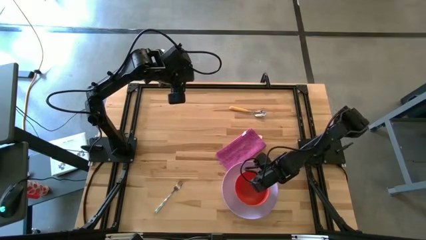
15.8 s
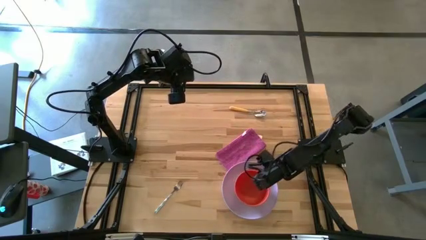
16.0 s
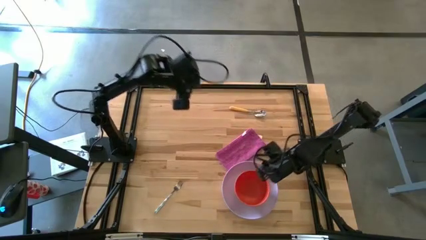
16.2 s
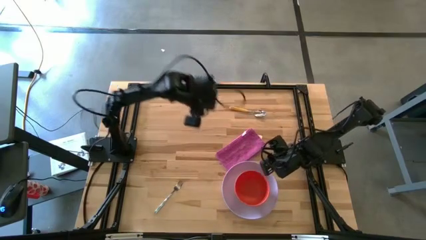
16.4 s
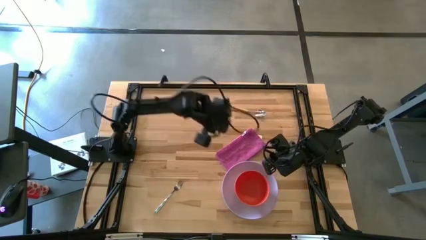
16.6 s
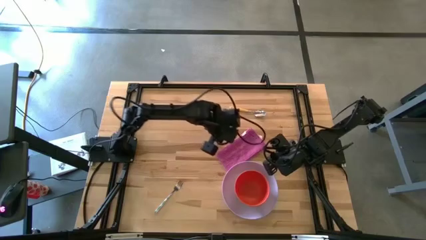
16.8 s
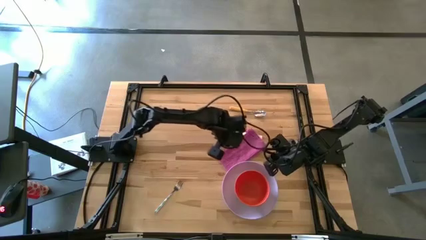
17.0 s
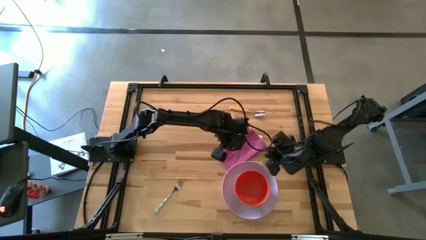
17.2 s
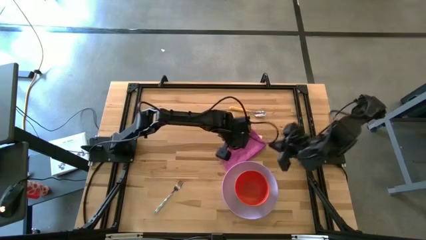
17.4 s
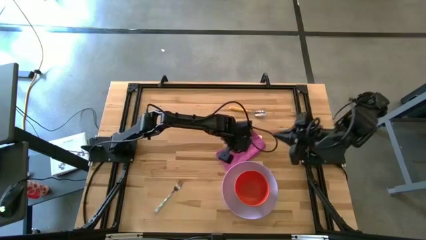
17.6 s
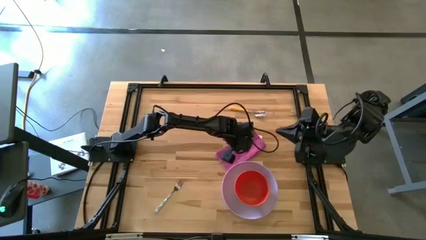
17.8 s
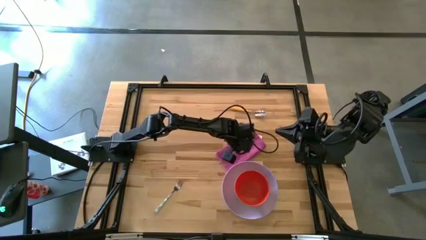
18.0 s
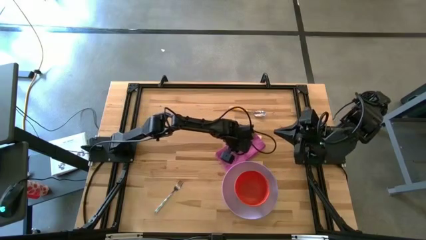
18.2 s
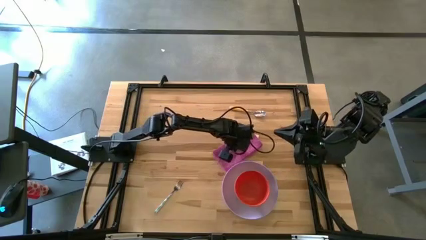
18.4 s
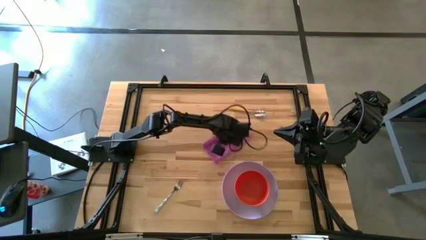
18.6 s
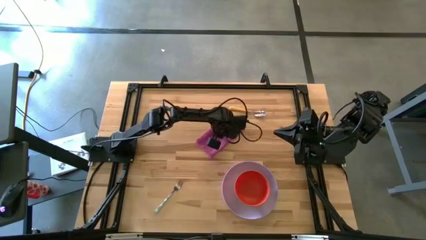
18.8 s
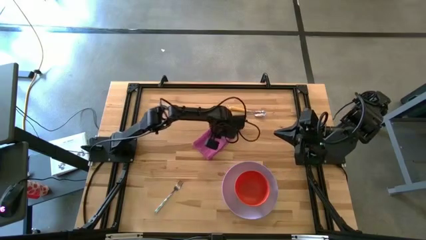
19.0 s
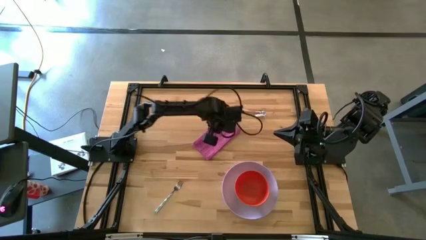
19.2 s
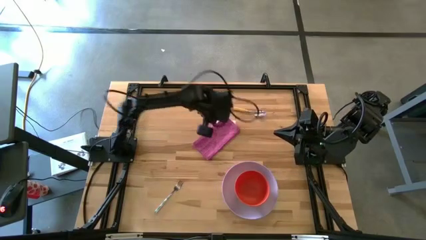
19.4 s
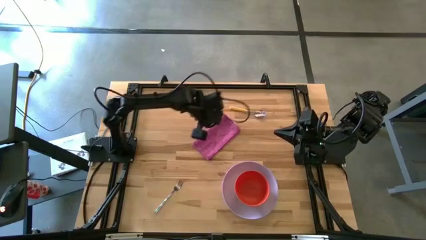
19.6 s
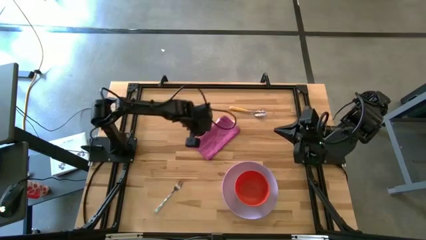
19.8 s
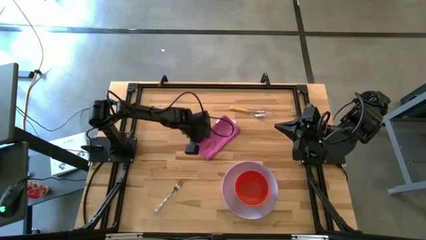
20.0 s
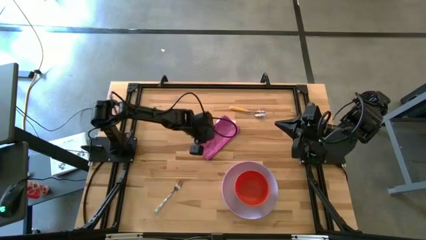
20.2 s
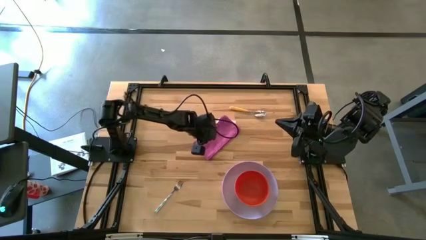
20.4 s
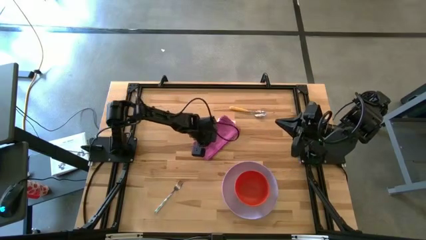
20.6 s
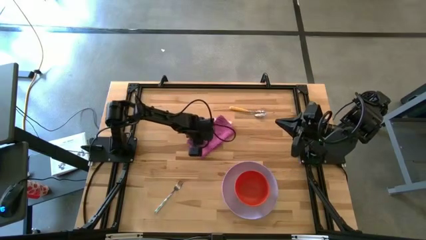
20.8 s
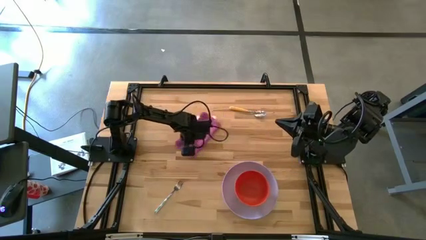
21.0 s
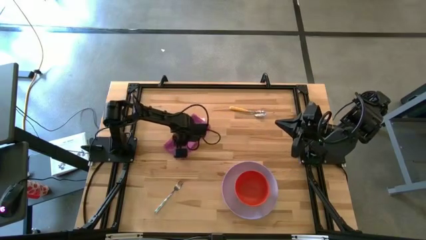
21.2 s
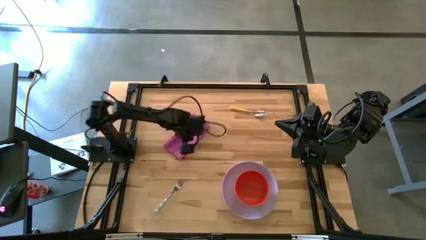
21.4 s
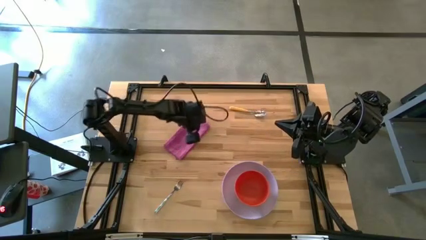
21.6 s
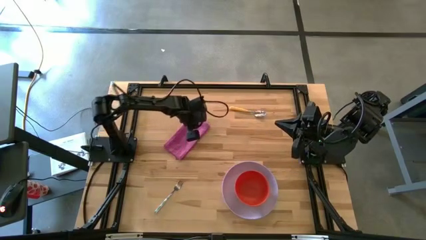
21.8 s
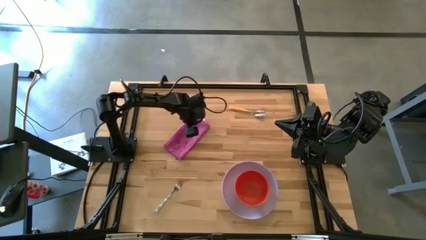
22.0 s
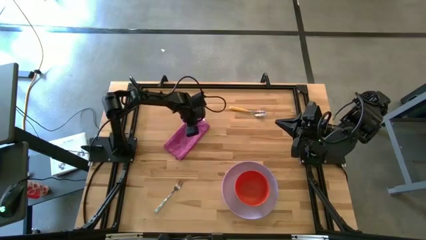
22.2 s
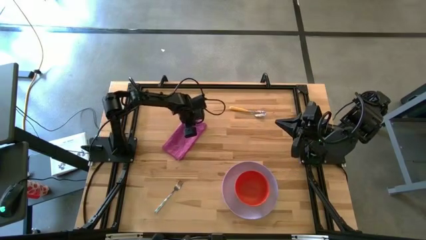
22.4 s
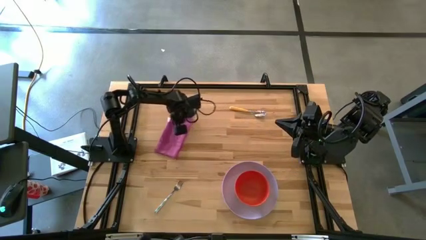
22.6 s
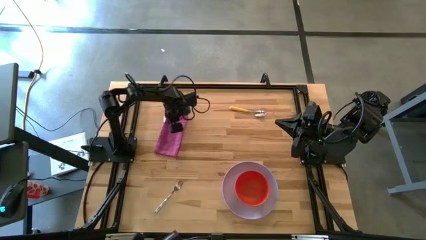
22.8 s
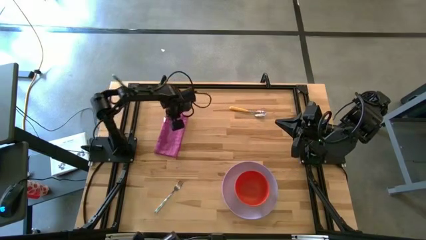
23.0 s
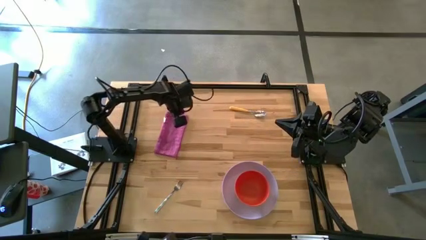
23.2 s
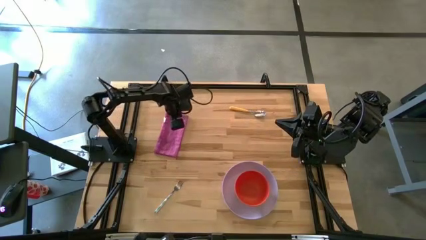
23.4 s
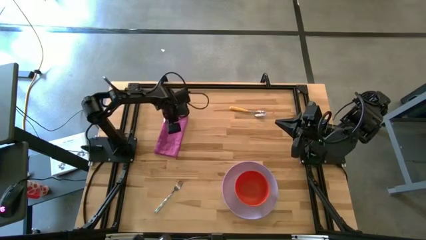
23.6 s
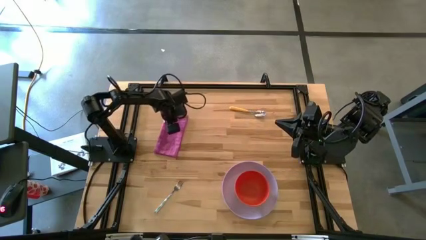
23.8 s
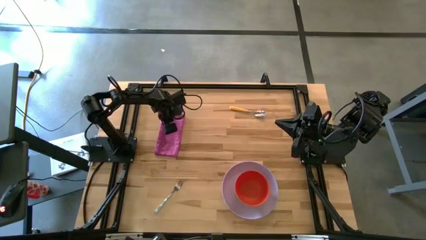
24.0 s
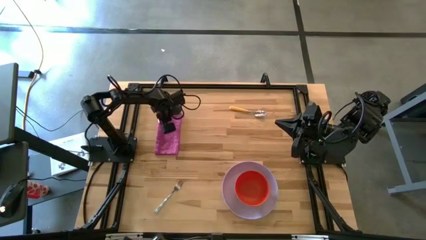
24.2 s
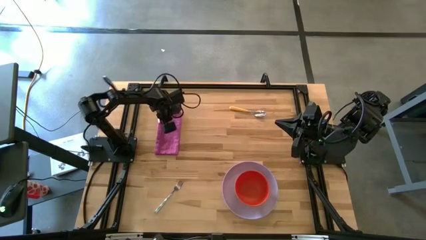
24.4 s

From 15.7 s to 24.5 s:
Task: Set table place
Move the purple napkin to the top left of the table

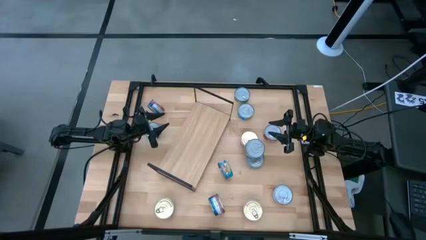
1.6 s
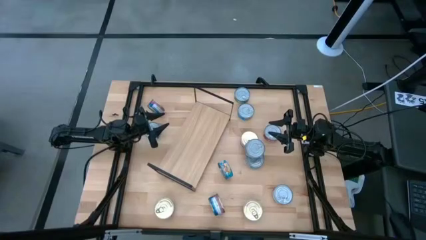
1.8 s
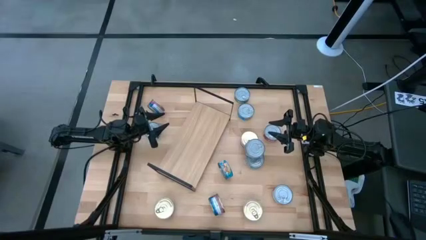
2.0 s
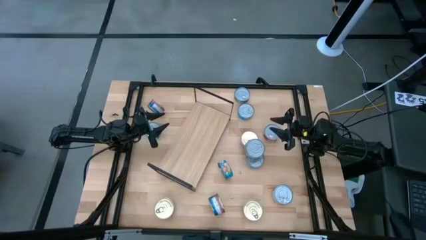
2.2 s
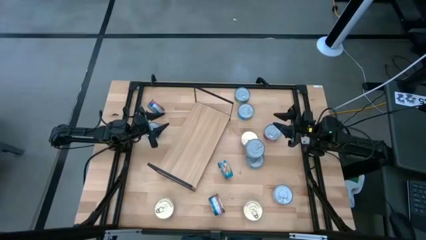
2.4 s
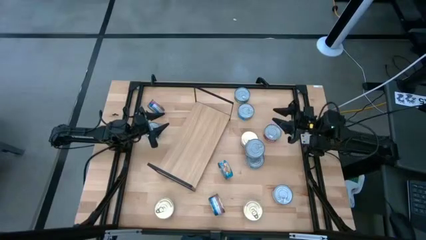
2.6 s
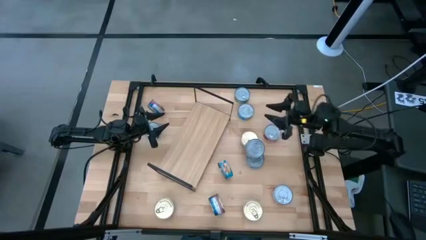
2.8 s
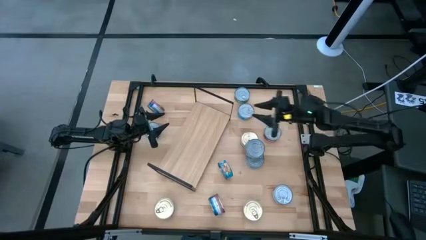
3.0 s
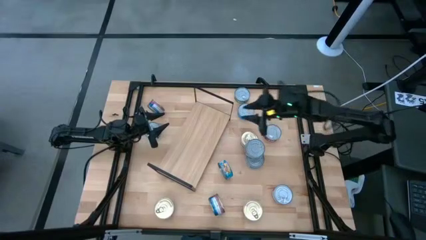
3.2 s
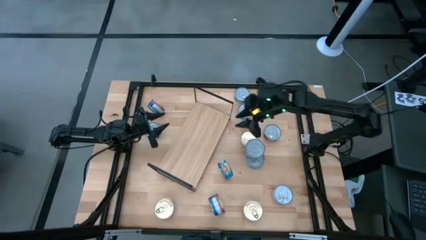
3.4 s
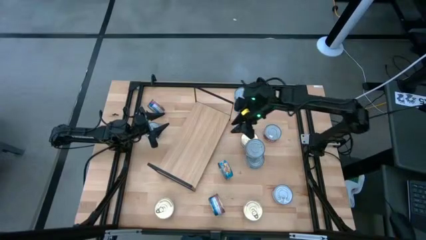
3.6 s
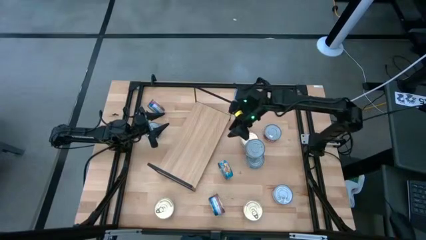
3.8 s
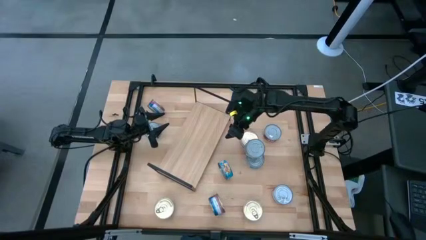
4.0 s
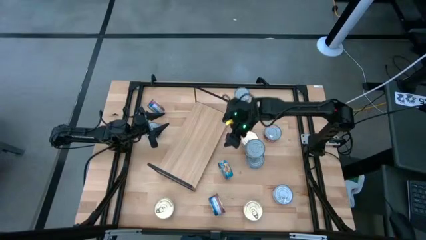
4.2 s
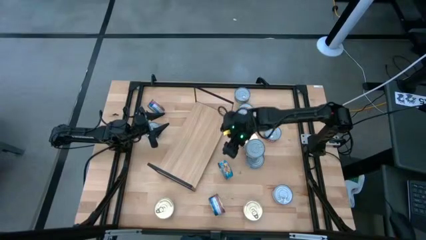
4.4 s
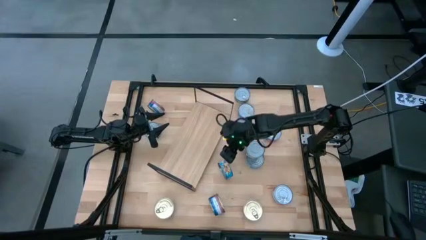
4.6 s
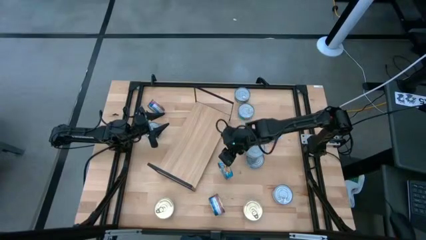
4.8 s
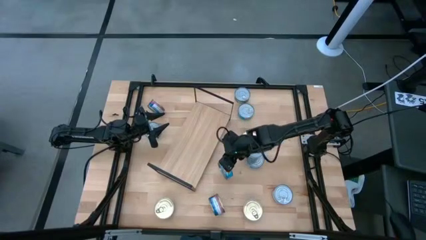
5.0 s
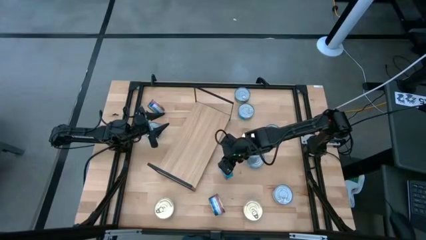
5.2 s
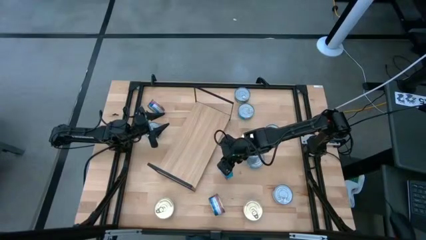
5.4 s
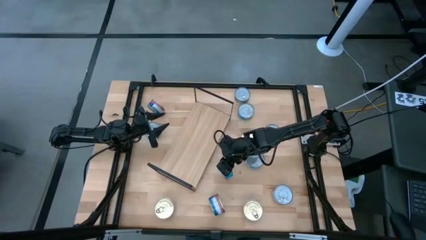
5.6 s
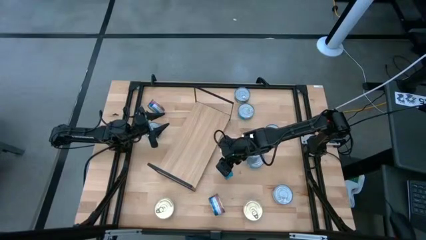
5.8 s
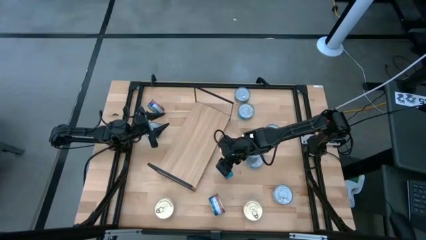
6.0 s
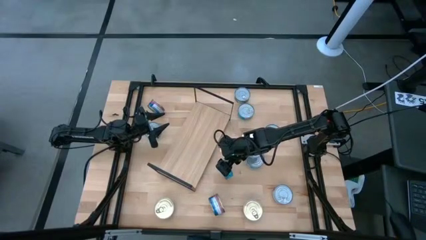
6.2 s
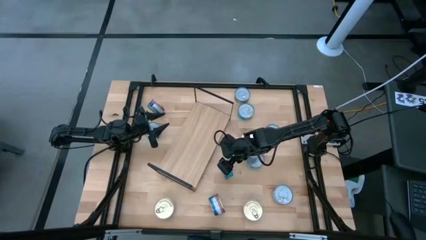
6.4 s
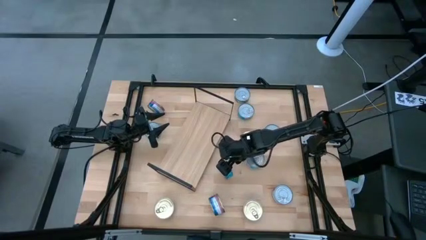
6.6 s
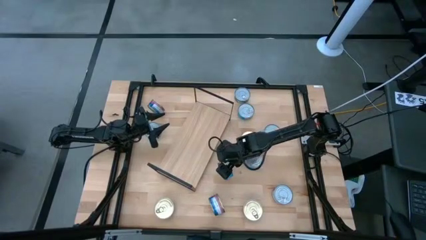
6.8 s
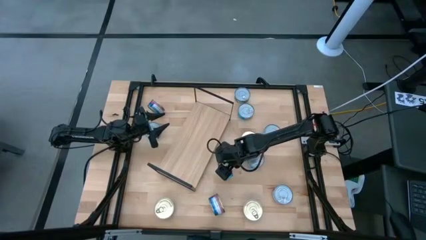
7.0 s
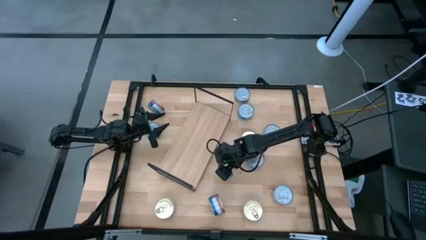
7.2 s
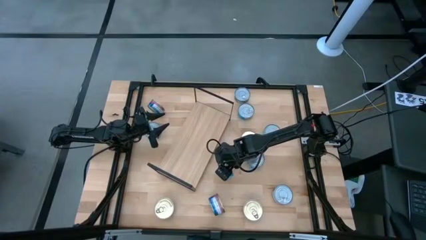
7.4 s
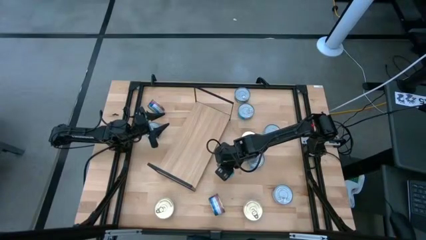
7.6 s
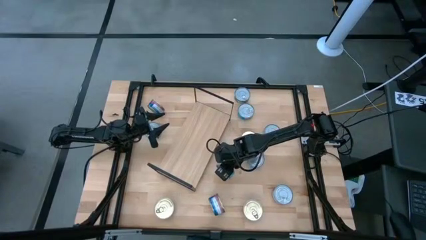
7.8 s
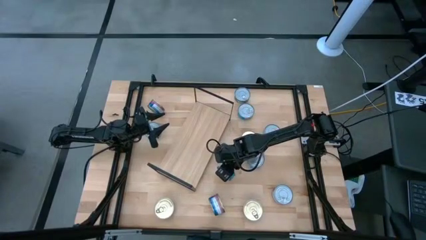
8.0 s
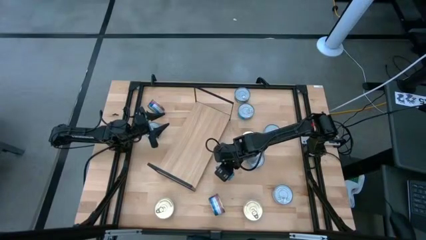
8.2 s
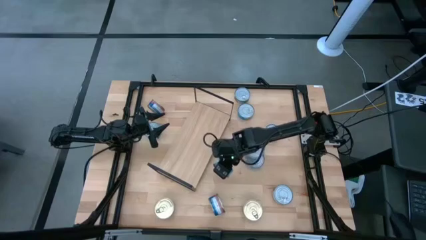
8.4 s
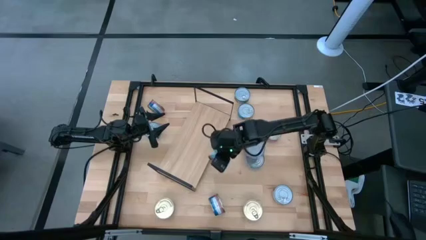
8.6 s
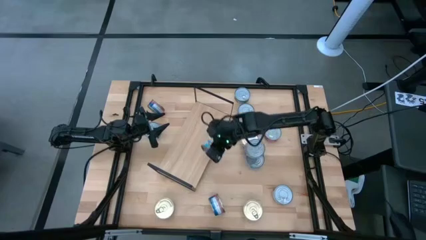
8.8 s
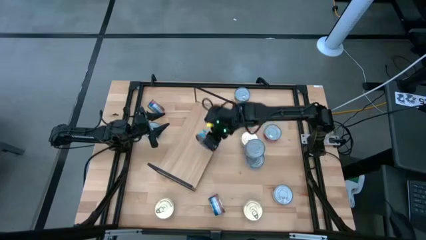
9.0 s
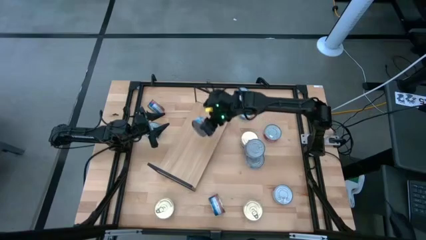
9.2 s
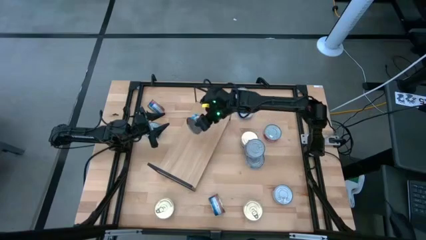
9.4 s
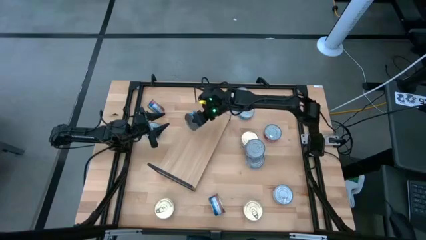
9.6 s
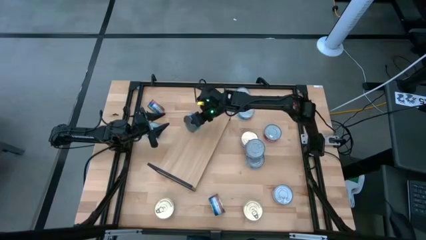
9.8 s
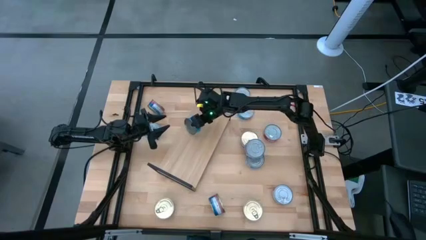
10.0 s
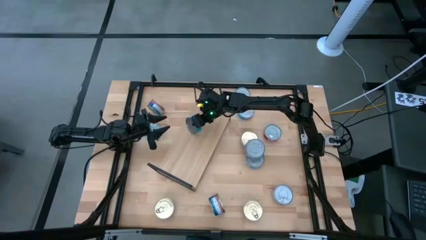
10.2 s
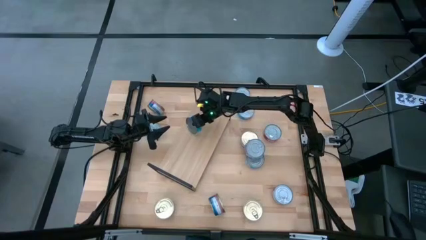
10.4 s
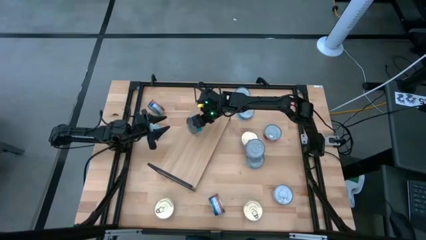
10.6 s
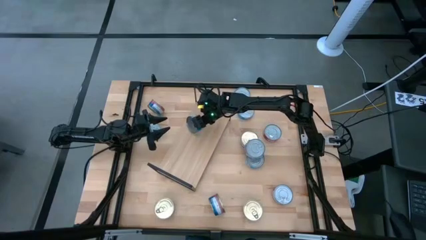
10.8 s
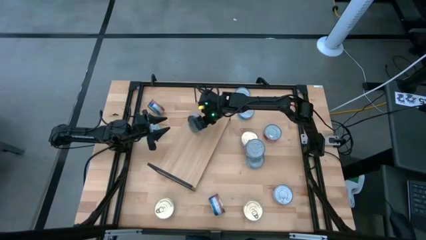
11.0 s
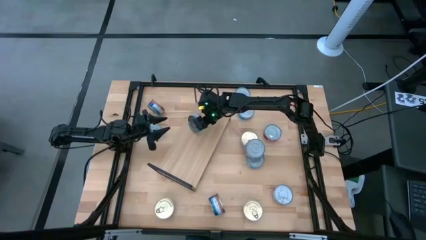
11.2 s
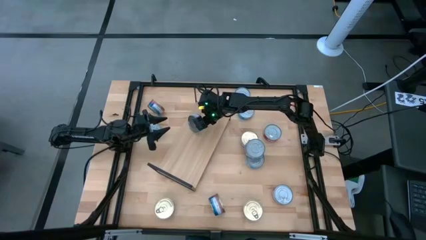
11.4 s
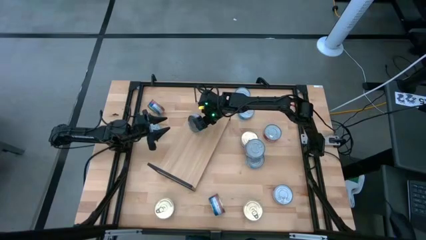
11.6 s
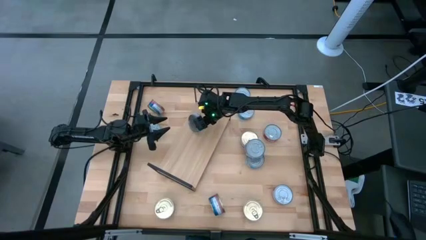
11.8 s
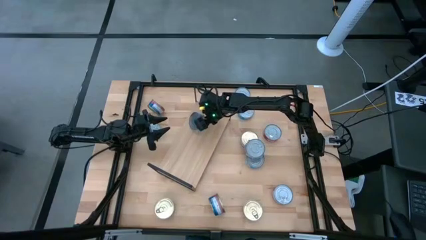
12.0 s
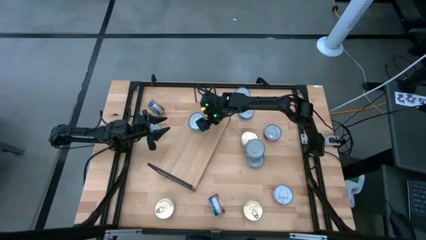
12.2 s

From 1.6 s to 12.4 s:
Task: Stack canned seafood by type on shelf
Put the light blue tuna can on the shelf
